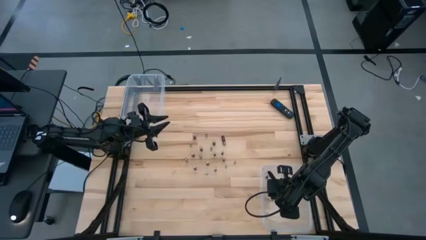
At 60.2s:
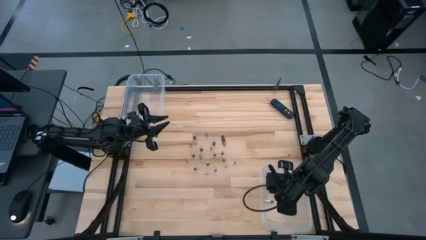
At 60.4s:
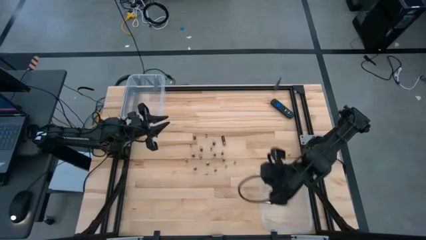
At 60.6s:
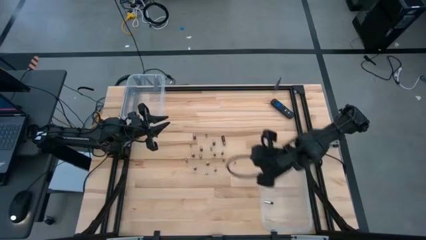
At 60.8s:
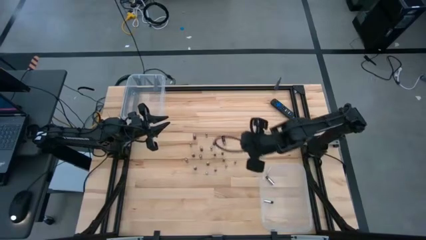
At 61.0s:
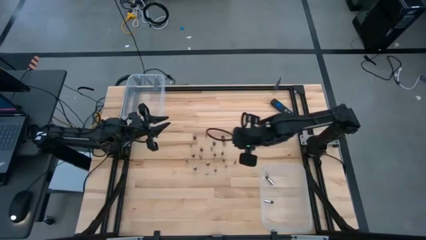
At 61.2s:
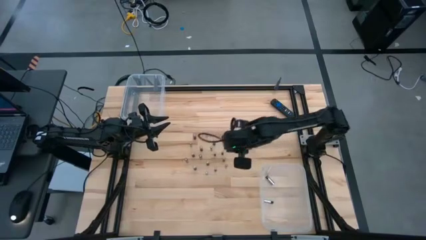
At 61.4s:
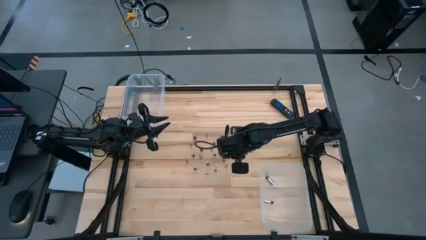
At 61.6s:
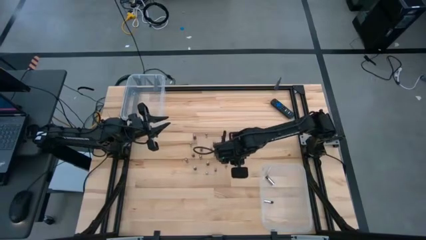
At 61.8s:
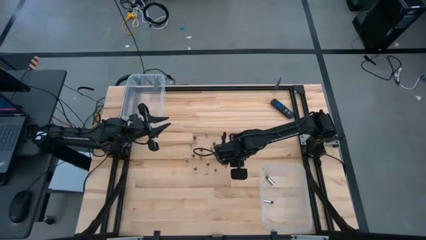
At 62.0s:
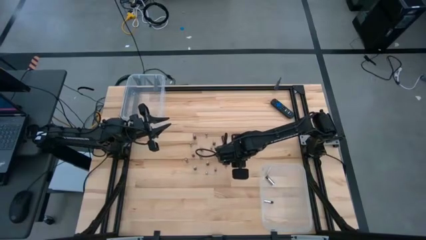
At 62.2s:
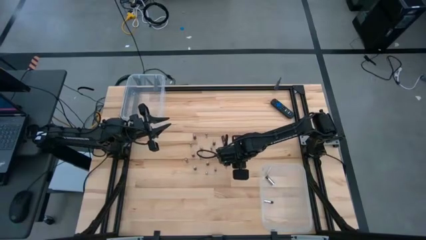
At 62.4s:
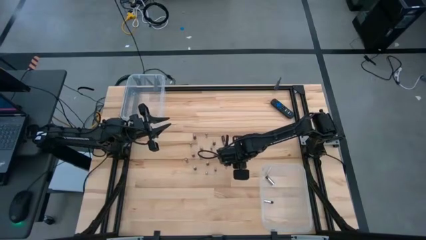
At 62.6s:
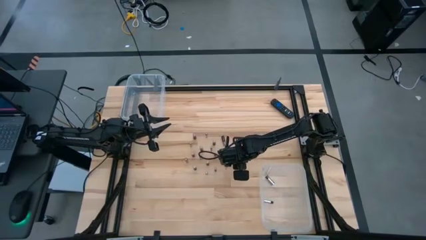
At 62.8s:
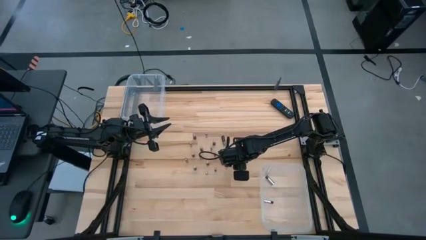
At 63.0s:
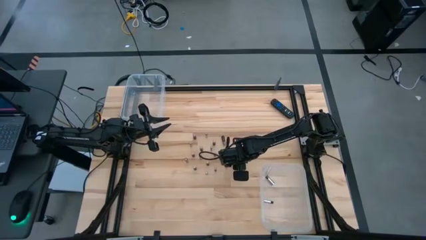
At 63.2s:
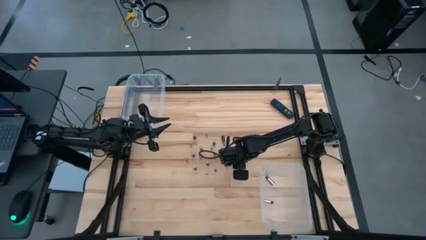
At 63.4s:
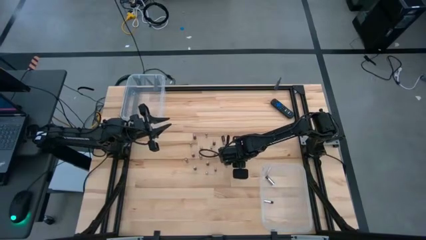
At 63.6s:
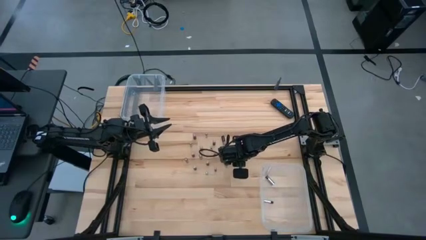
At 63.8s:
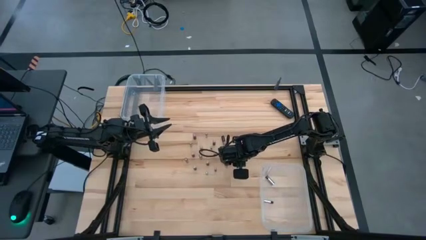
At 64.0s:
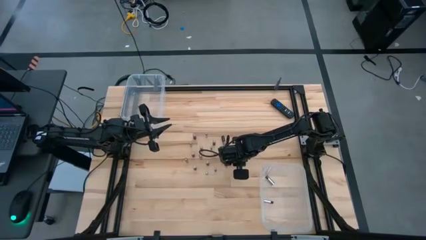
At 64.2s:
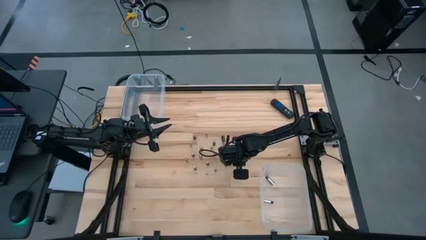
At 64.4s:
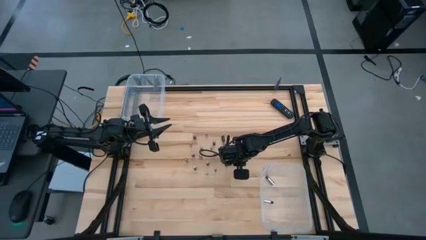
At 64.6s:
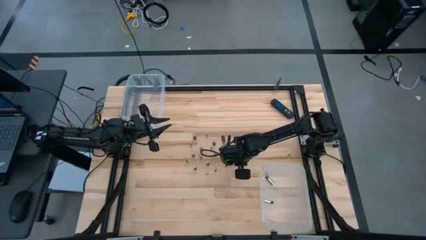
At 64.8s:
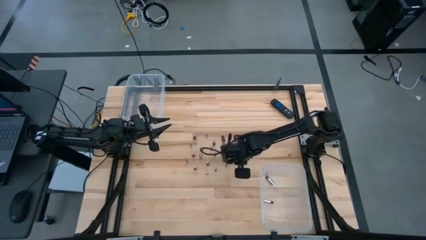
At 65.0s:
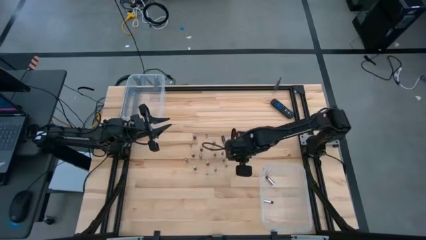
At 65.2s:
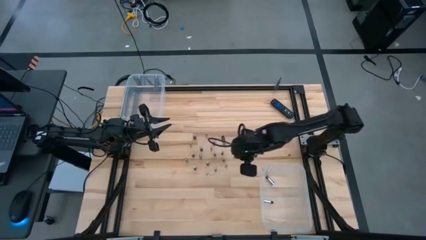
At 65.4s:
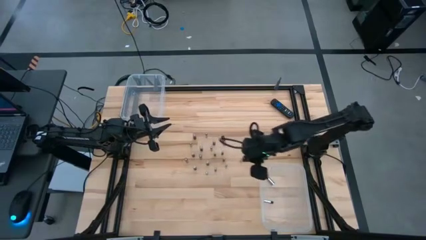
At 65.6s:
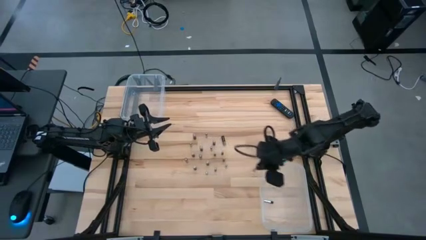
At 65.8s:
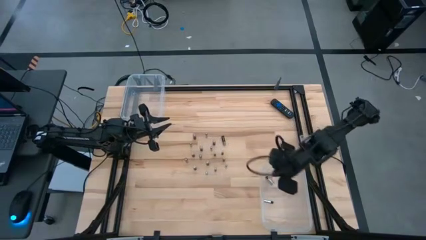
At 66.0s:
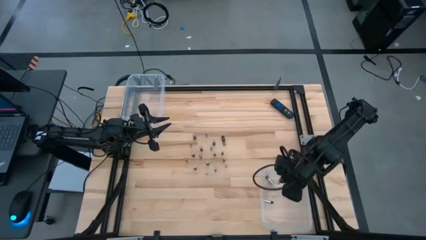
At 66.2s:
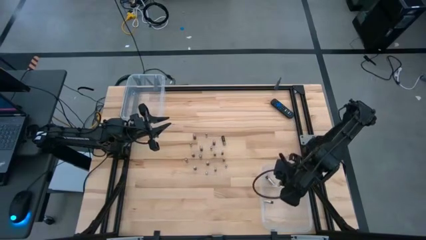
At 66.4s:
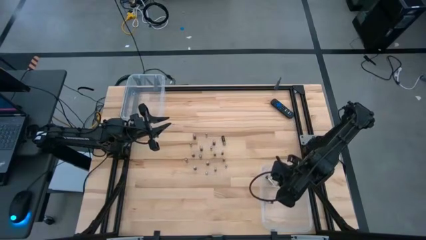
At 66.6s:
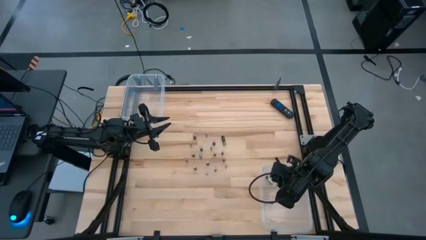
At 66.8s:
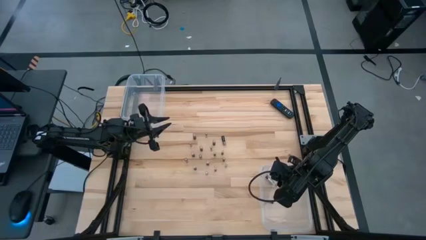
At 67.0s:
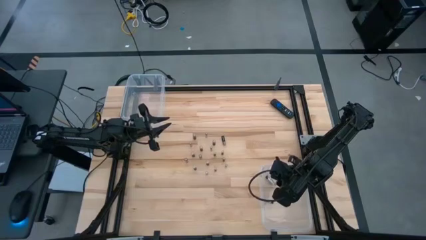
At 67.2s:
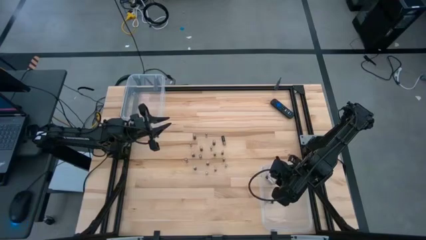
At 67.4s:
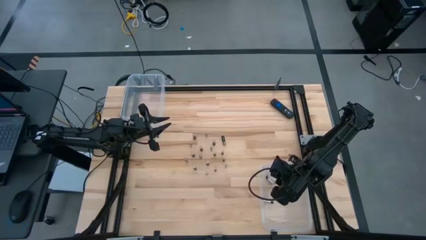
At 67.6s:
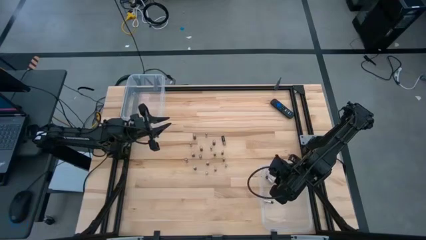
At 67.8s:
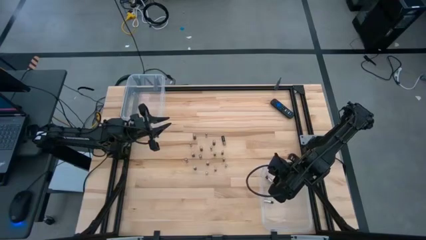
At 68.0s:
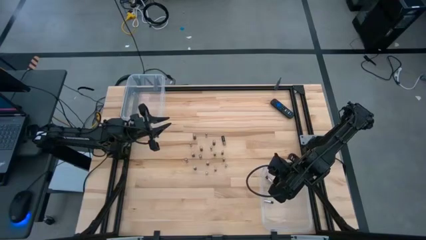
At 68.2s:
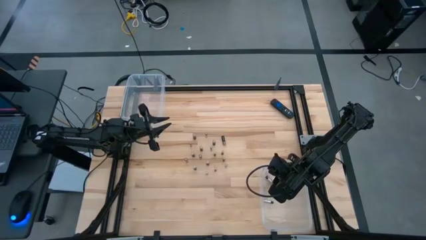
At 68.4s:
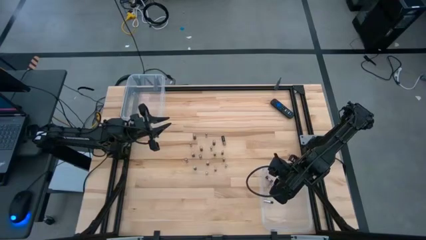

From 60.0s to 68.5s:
Task: Sort batteries
Put the black and silver battery into the bottom transparent bin

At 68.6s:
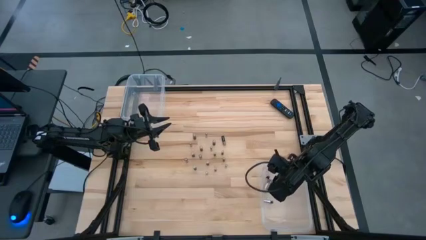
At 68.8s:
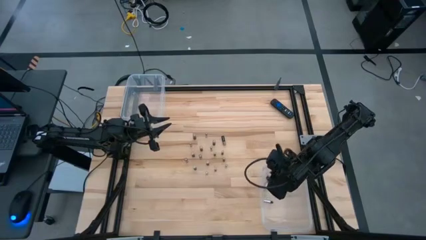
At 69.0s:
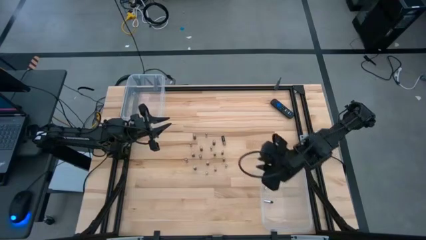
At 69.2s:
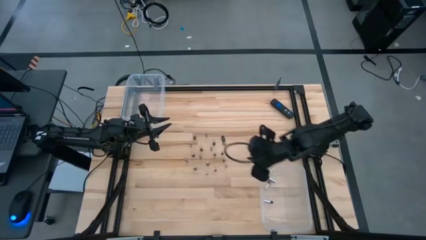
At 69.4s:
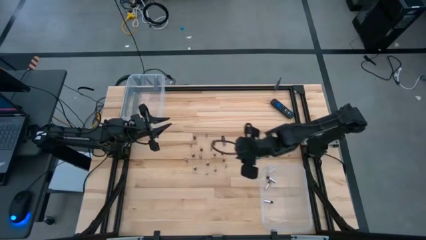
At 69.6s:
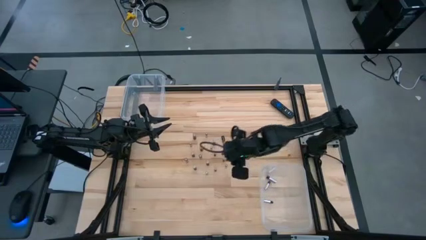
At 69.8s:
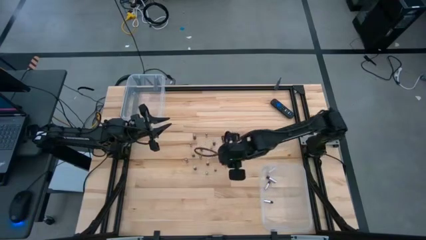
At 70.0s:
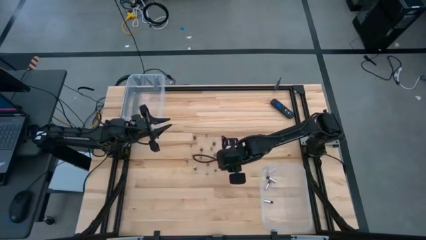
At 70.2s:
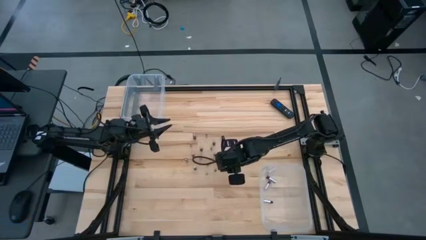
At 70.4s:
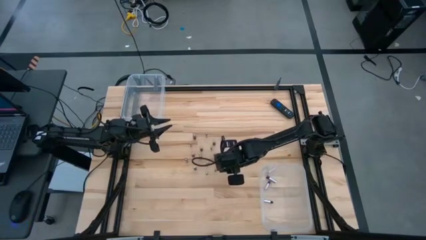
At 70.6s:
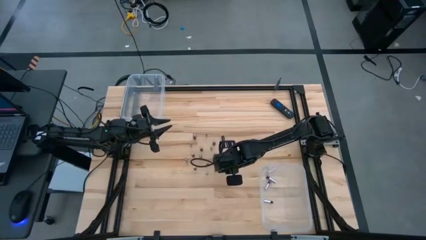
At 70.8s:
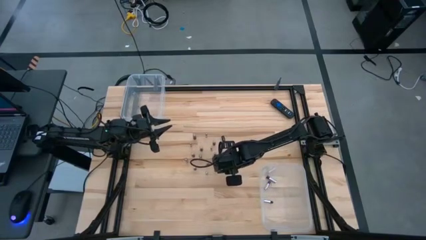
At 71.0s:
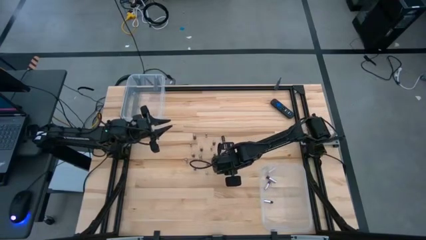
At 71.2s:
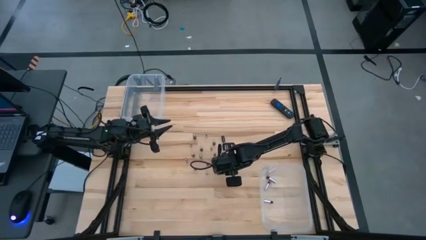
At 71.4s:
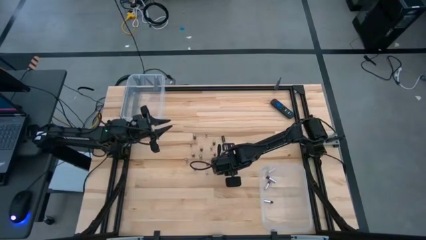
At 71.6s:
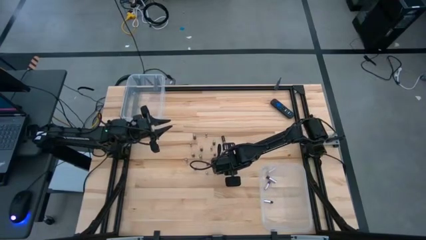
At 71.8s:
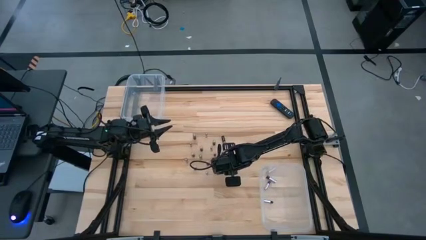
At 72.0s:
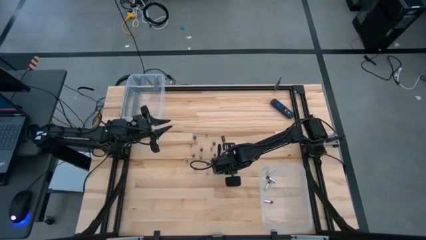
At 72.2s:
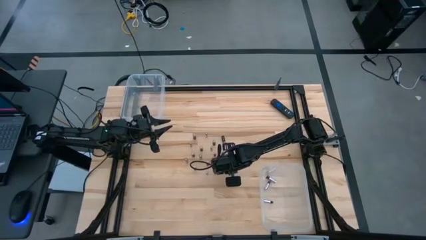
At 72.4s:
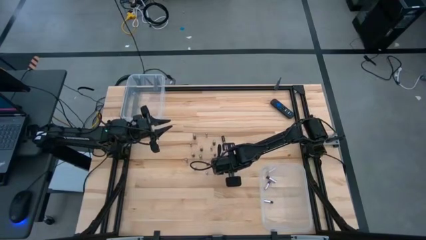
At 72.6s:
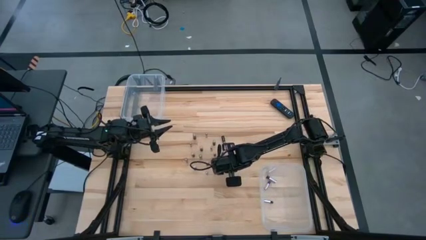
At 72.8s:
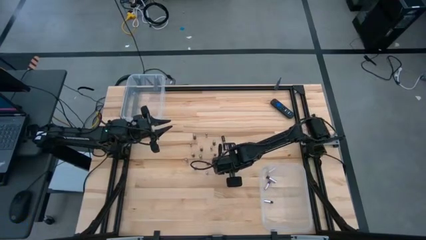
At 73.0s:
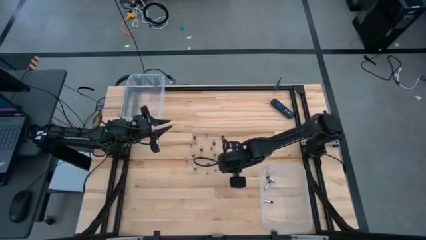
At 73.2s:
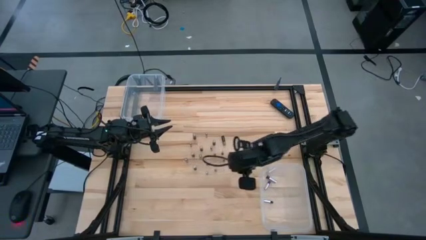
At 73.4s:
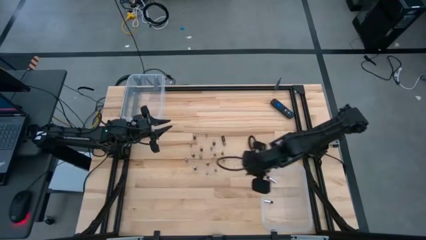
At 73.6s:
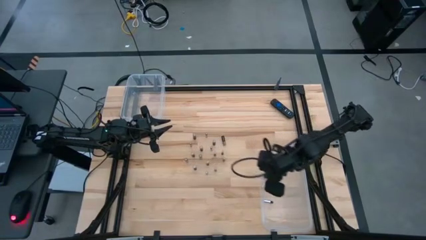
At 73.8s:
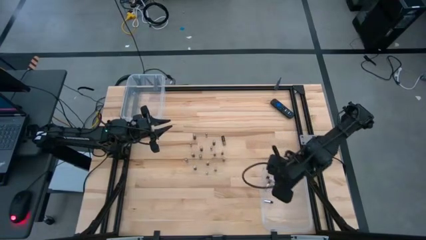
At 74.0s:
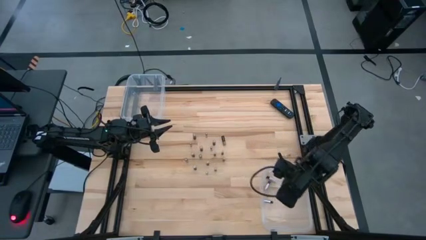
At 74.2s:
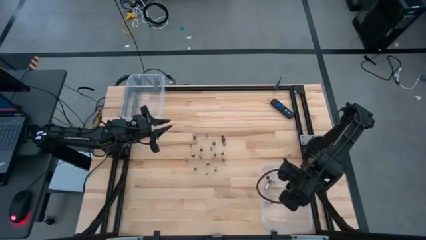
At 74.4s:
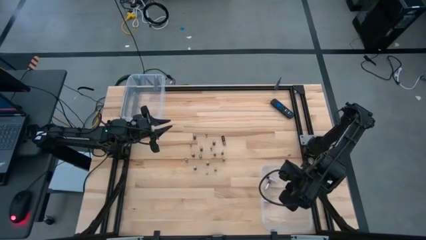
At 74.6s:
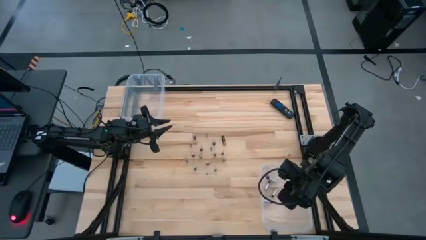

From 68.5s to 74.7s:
Put the black and silver battery into the bottom transparent bin
